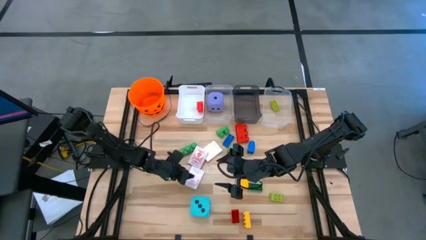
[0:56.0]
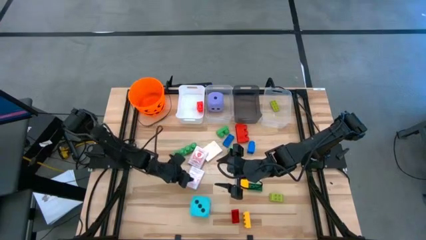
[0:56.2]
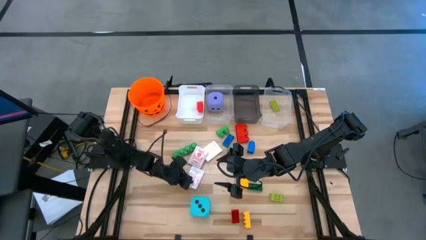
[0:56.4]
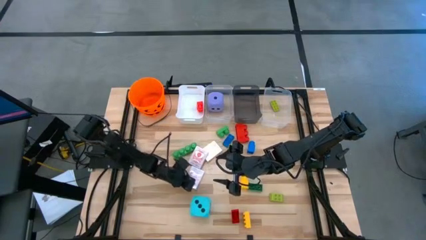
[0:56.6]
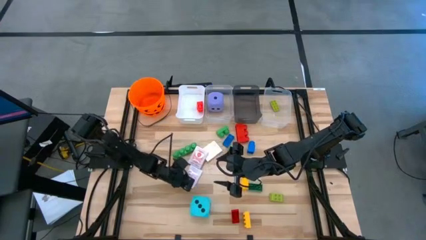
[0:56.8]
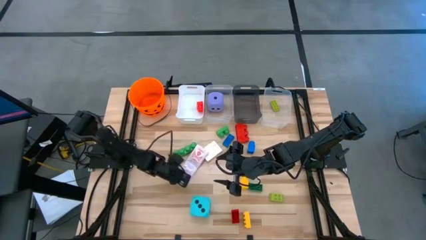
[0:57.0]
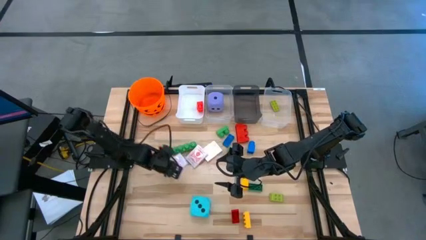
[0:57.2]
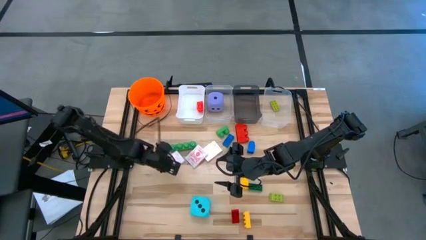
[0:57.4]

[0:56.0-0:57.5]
Task: Pick & Place Toys
Move the red deck of cards to the middle left of the table

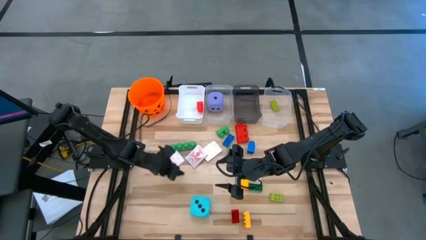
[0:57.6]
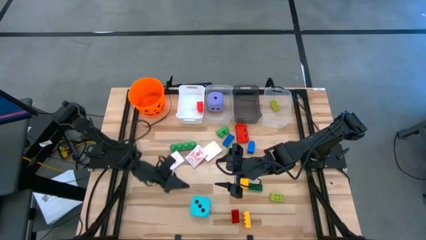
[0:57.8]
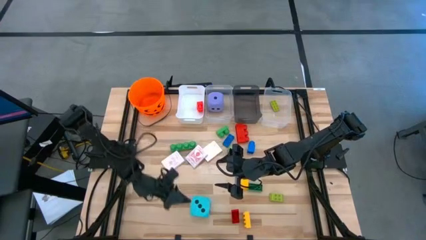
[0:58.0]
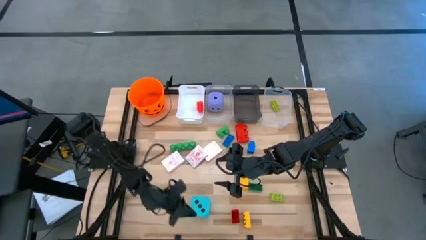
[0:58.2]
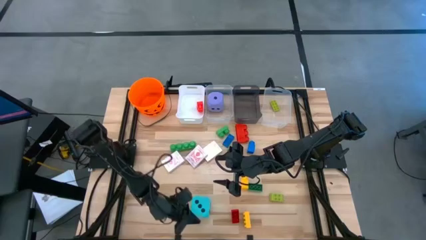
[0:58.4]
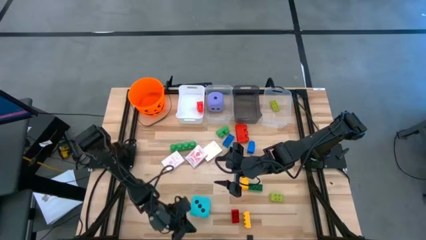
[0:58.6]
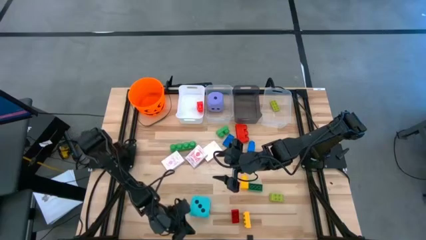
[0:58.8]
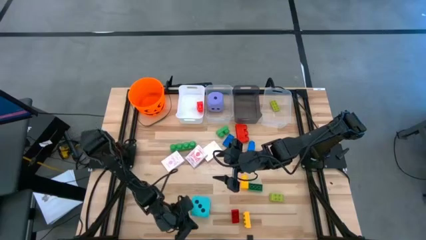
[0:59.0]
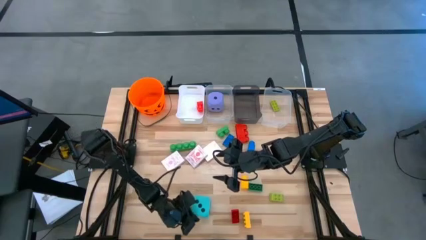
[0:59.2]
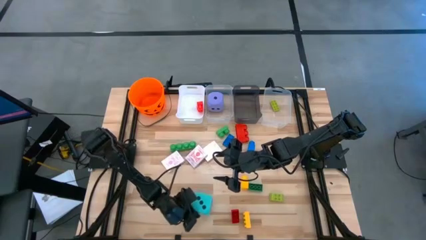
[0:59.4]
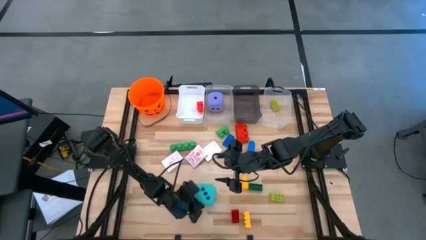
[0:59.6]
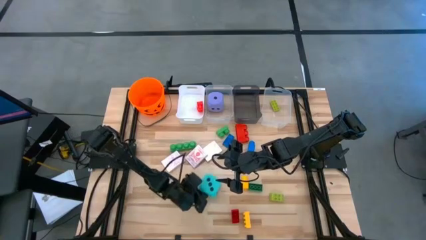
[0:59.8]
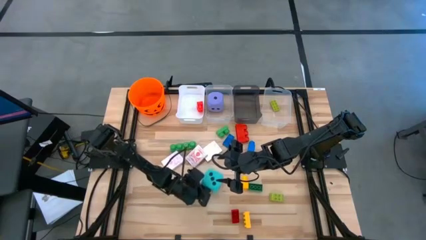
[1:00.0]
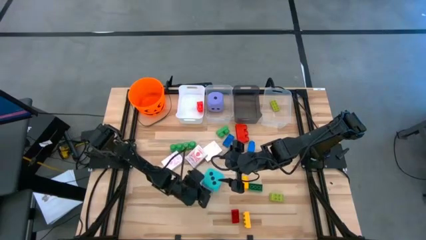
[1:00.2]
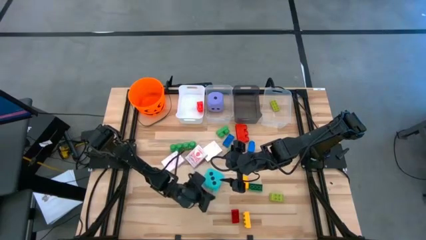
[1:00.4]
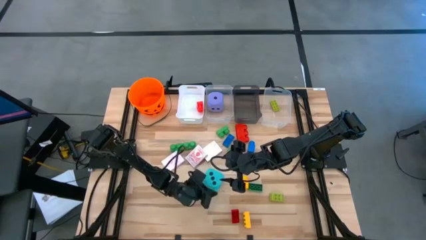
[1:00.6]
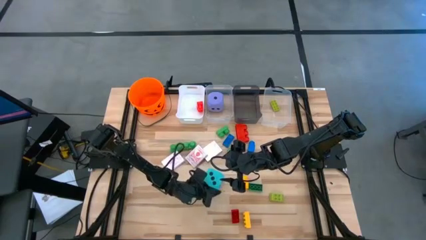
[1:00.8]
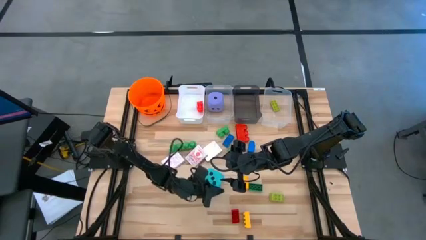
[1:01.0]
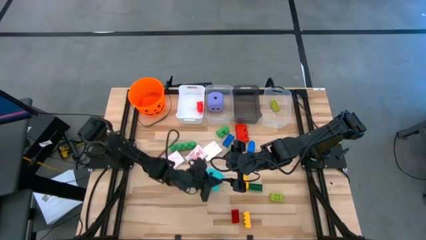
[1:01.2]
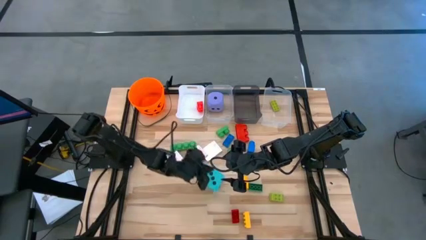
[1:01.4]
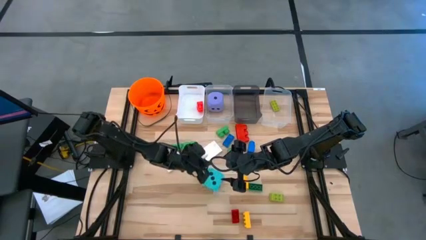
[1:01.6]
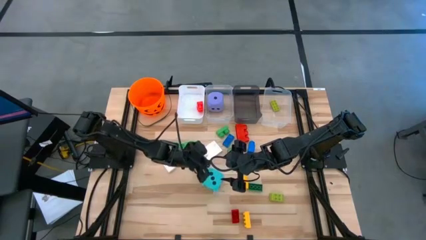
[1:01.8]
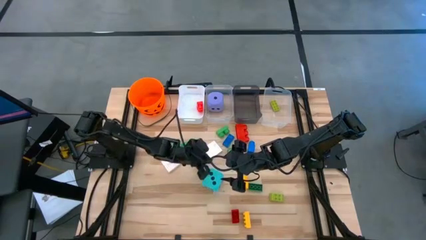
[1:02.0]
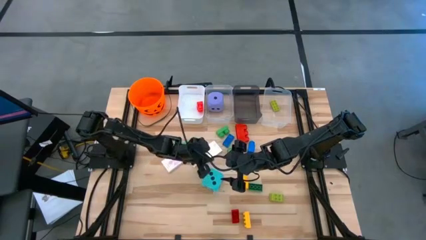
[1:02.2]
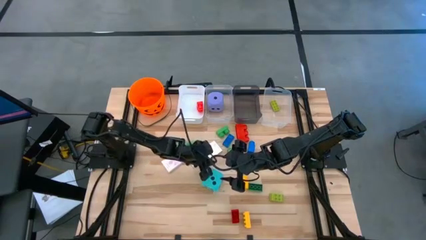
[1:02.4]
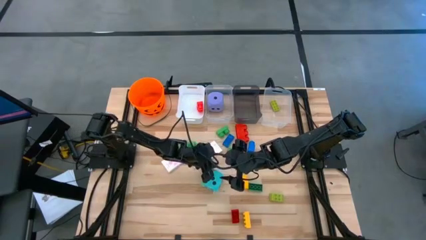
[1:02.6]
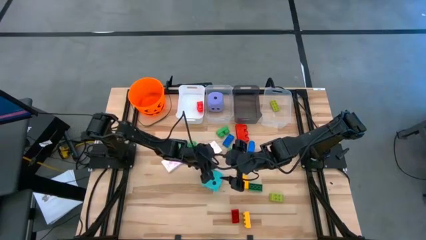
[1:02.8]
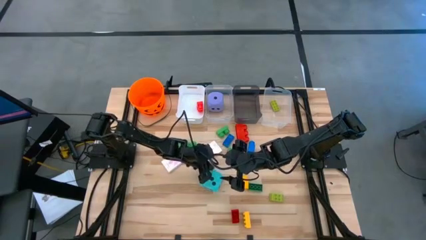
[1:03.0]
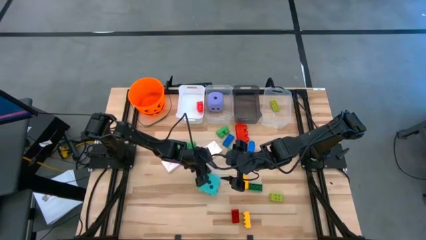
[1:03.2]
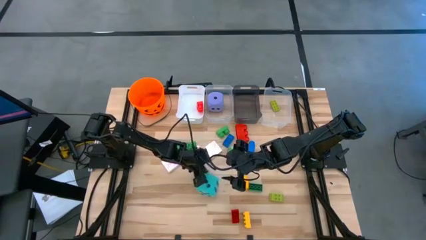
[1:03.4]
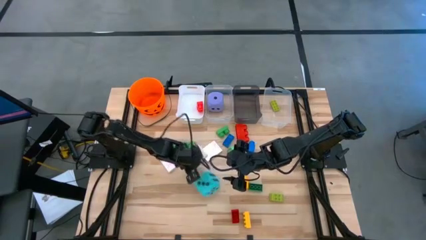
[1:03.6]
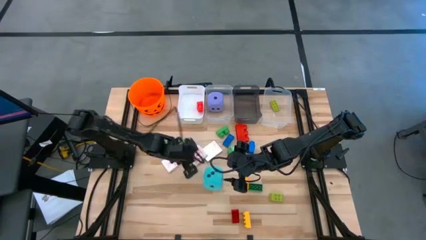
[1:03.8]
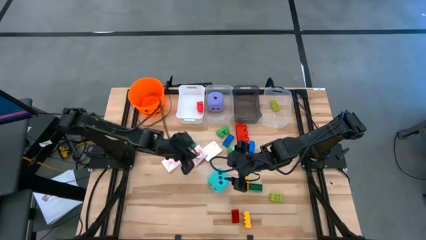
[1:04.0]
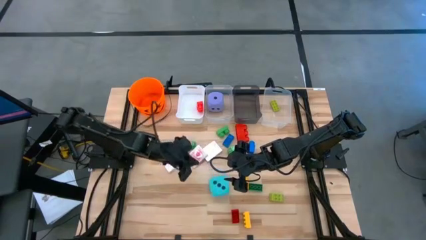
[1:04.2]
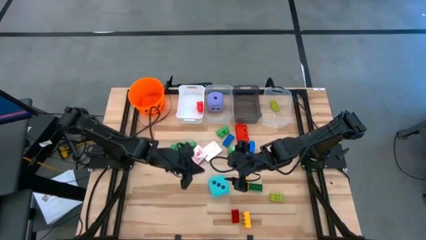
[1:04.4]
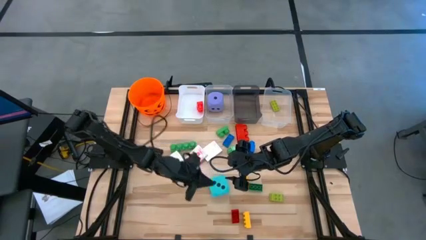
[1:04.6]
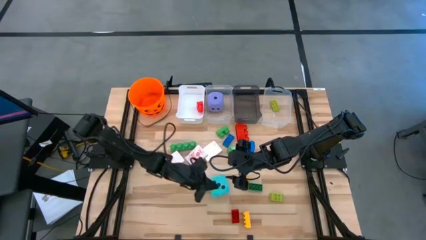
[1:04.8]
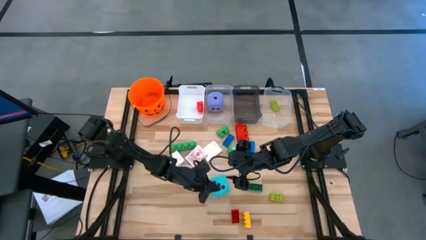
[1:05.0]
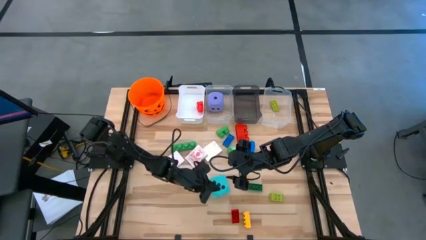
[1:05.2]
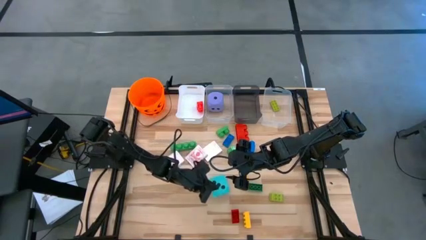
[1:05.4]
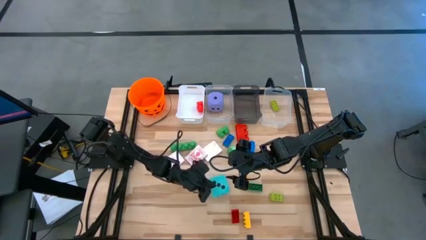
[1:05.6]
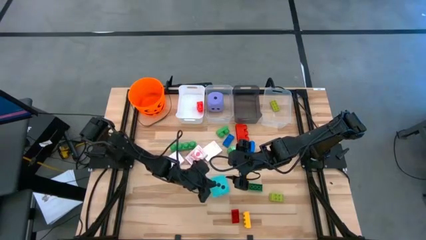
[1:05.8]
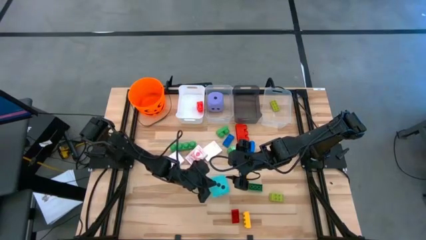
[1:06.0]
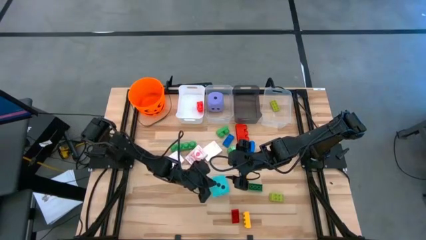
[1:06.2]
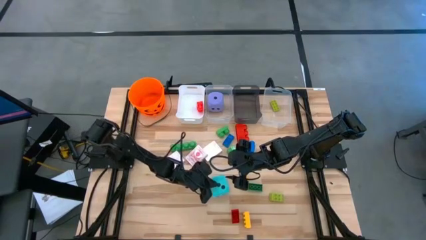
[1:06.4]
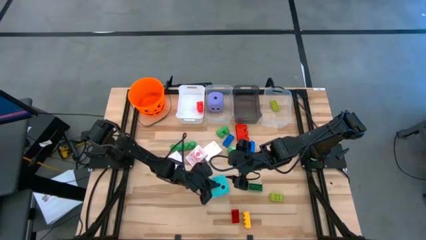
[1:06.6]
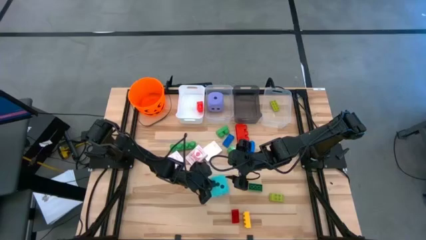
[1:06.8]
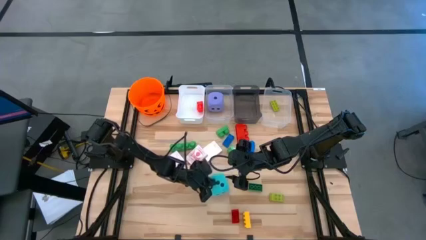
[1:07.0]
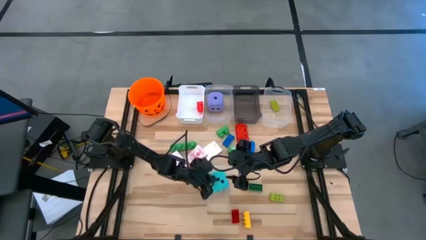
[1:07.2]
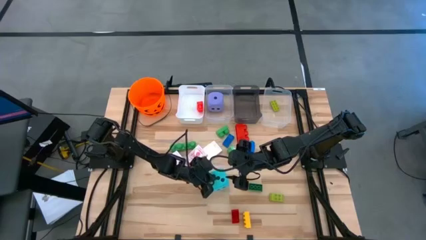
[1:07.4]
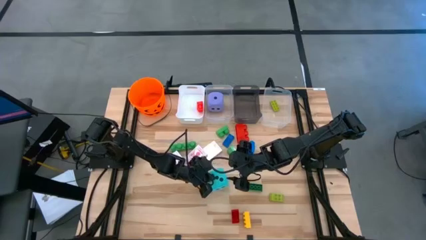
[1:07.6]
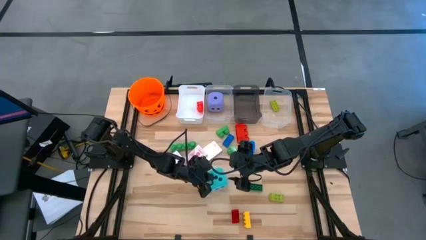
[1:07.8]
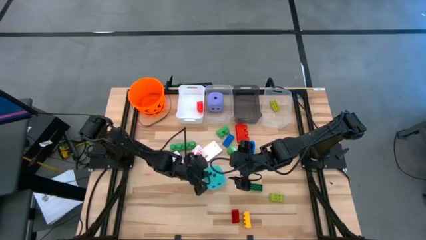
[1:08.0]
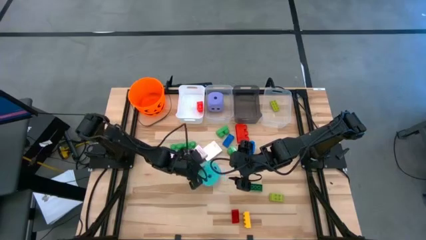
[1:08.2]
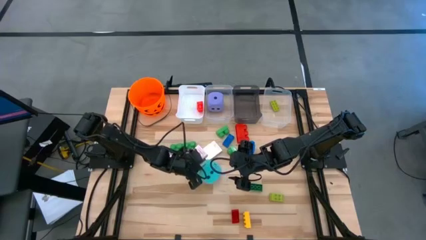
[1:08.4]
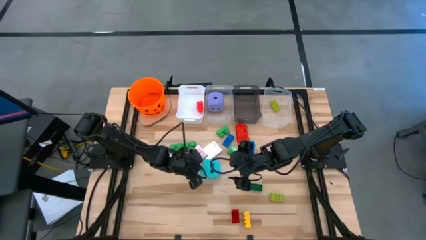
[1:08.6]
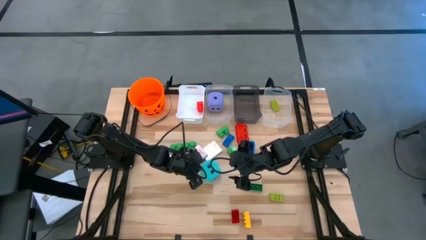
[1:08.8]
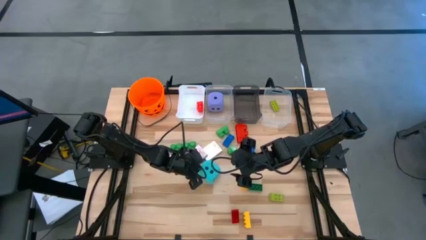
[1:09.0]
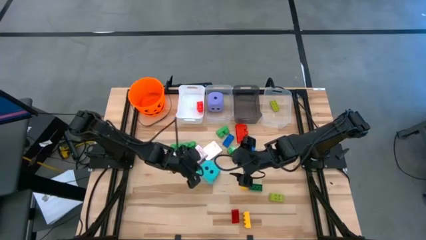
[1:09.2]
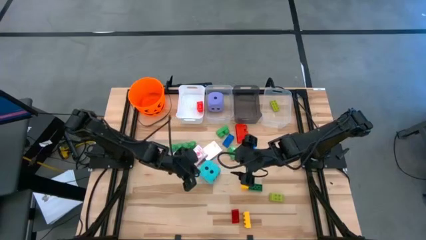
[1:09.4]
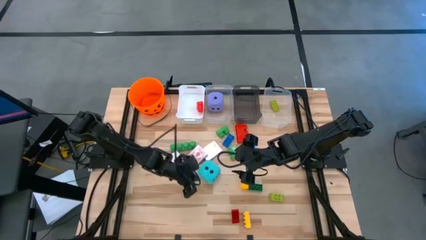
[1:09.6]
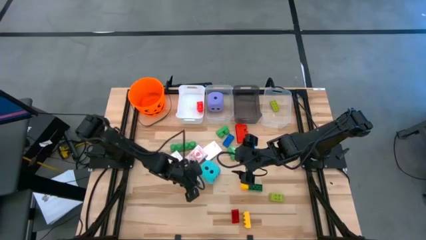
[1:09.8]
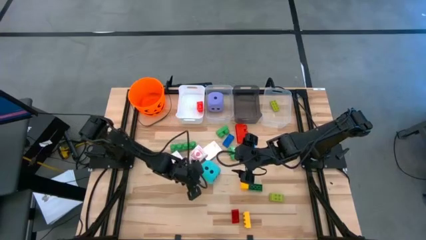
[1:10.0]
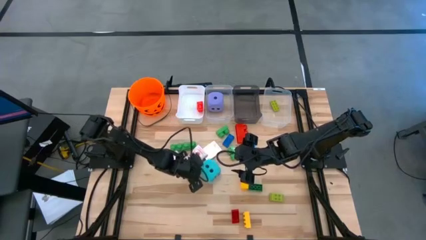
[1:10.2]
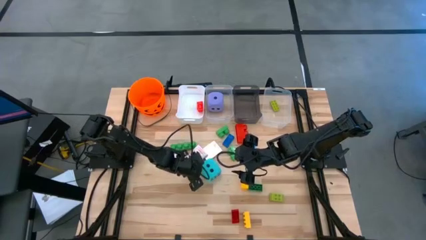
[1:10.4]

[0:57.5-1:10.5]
Put the blue dice into the left transparent bin

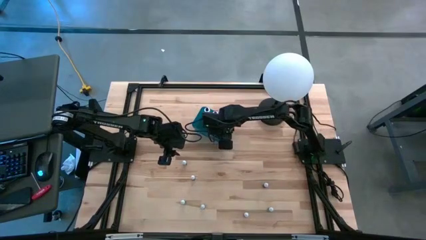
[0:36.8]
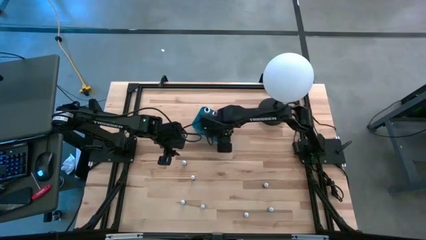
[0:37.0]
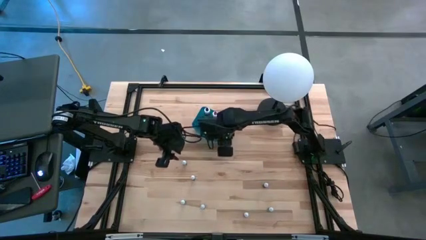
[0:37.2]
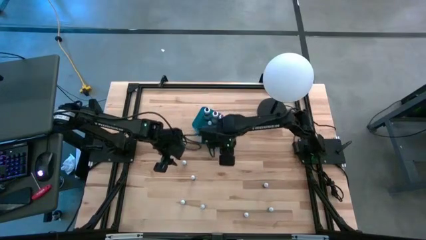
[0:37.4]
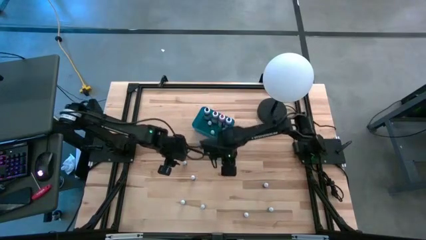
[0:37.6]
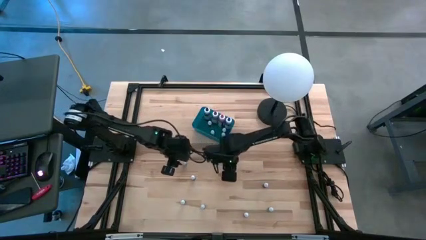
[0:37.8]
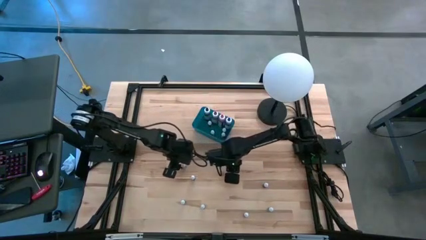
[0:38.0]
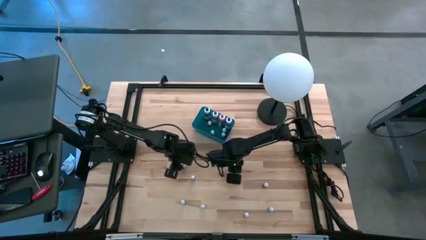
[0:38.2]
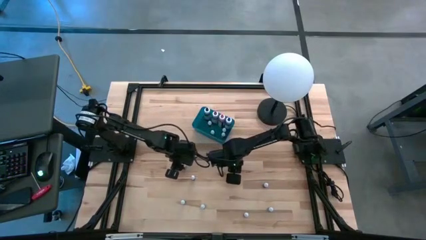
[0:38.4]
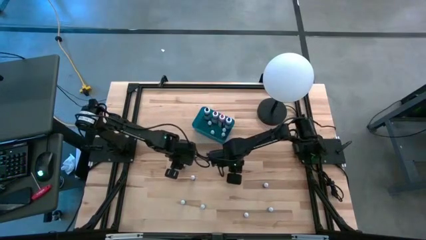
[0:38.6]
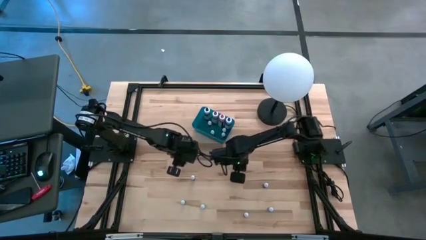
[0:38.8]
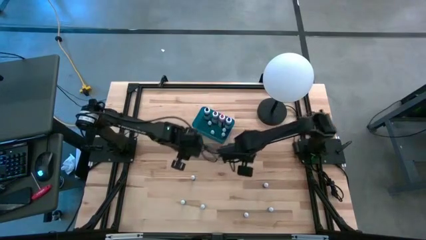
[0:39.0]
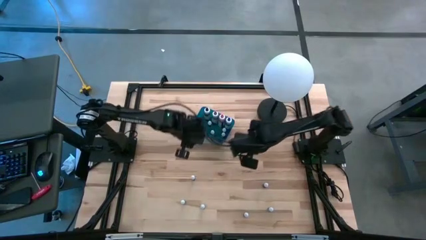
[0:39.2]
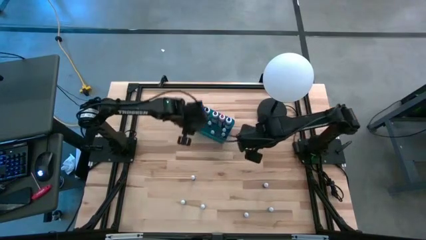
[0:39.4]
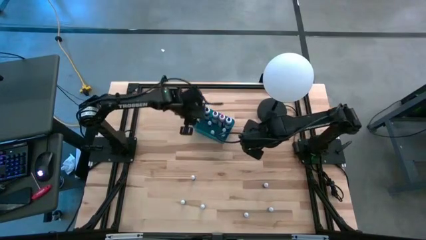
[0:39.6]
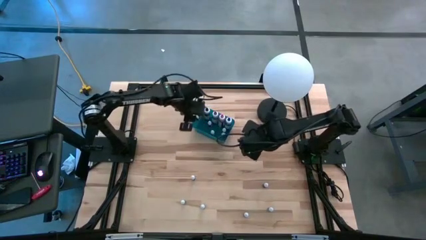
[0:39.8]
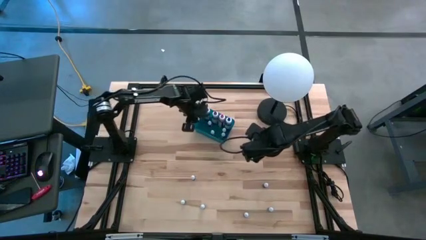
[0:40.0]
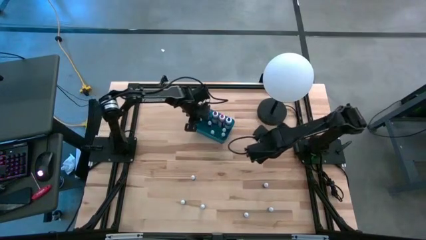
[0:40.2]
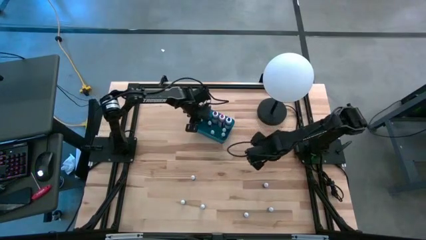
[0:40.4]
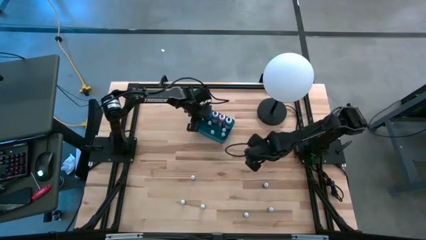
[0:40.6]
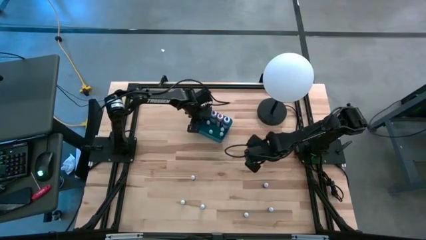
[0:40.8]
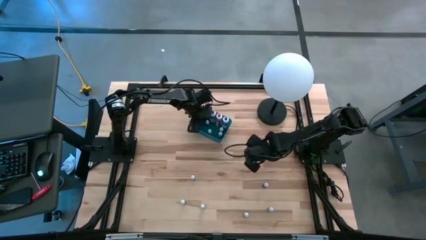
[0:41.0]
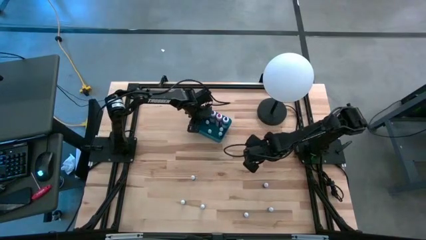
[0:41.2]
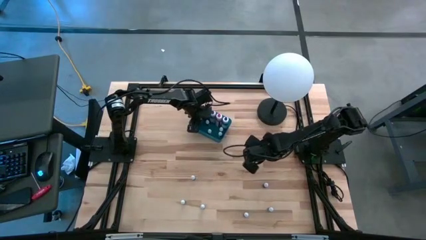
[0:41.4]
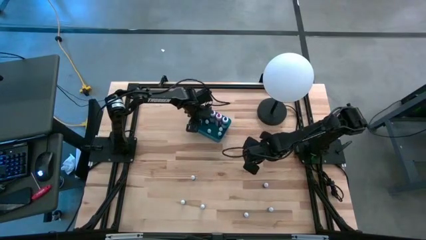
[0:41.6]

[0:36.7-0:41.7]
Task: Pick & Place food coloring
Put the small blue food coloring bottle into the blue bin
